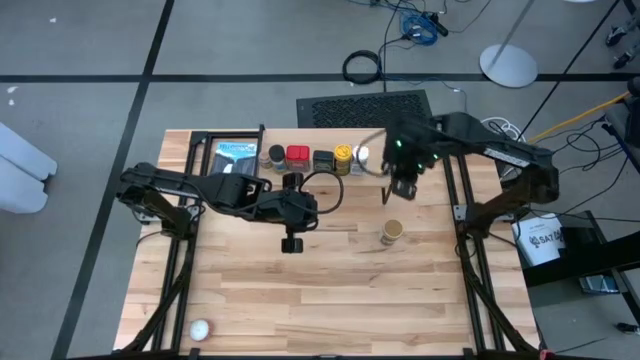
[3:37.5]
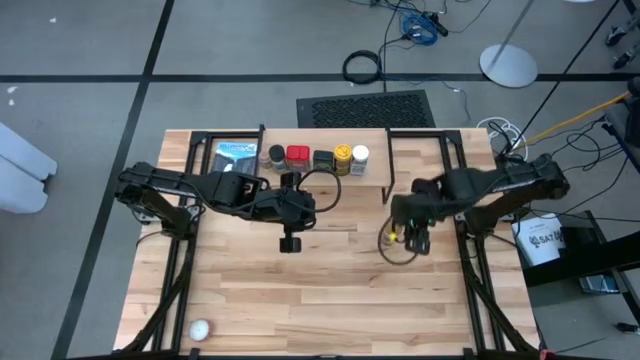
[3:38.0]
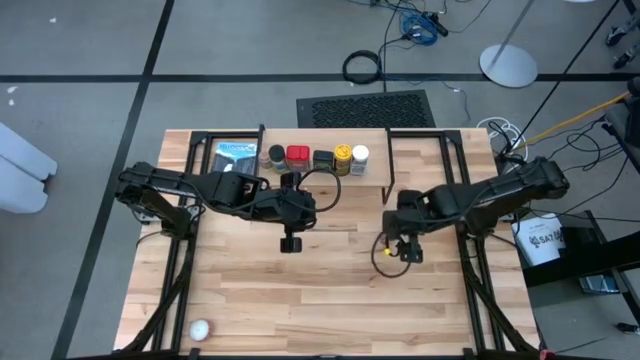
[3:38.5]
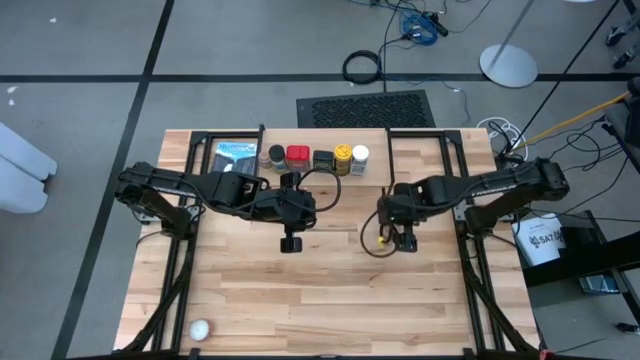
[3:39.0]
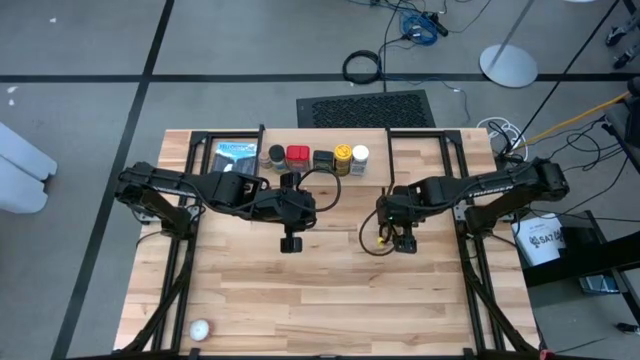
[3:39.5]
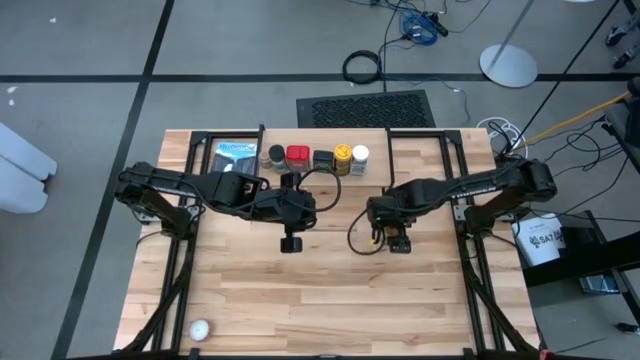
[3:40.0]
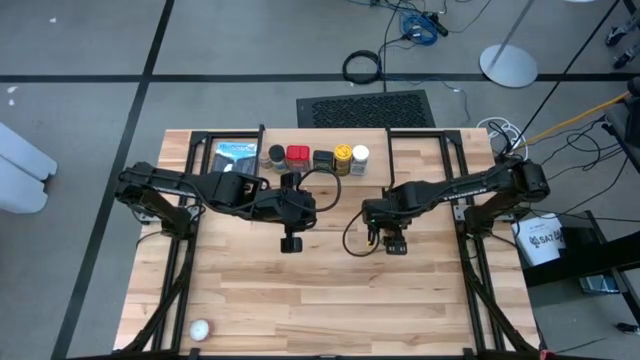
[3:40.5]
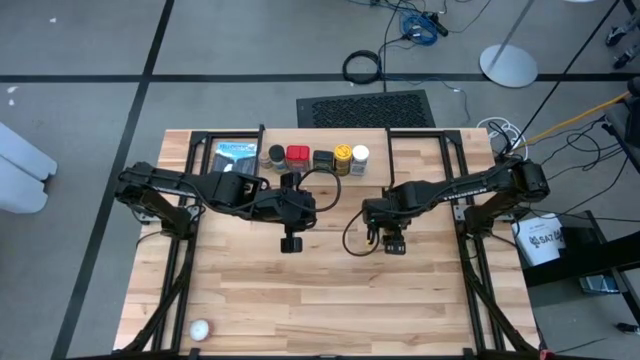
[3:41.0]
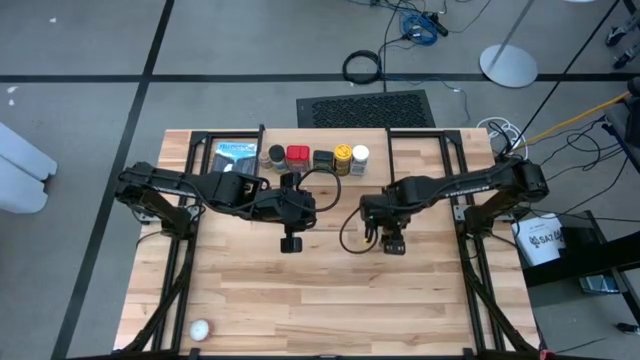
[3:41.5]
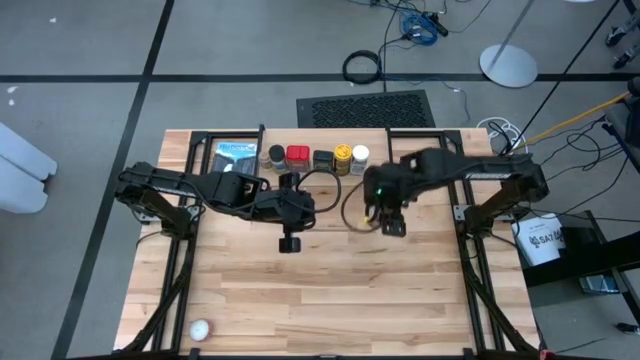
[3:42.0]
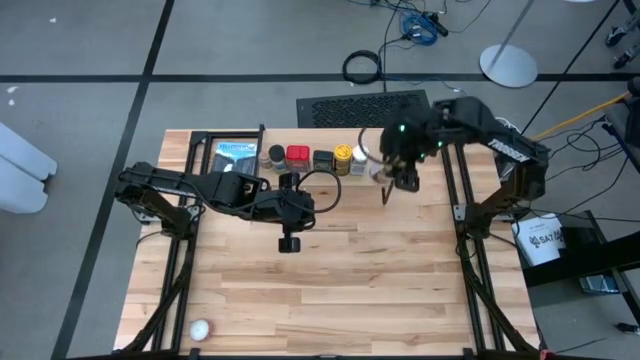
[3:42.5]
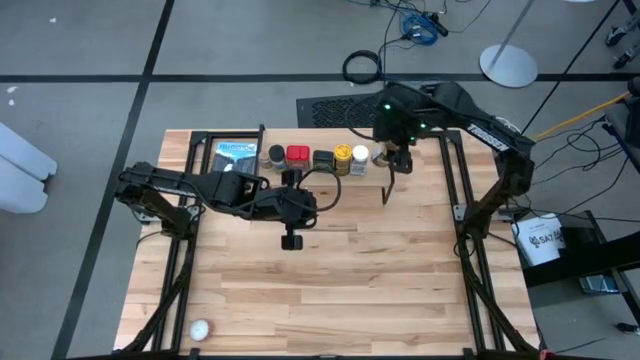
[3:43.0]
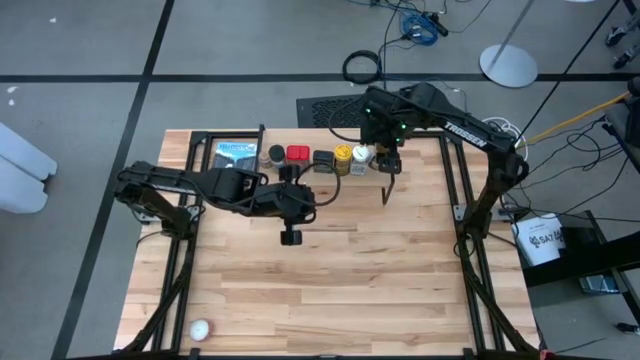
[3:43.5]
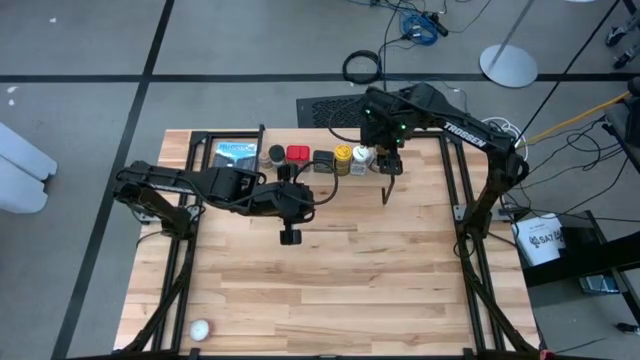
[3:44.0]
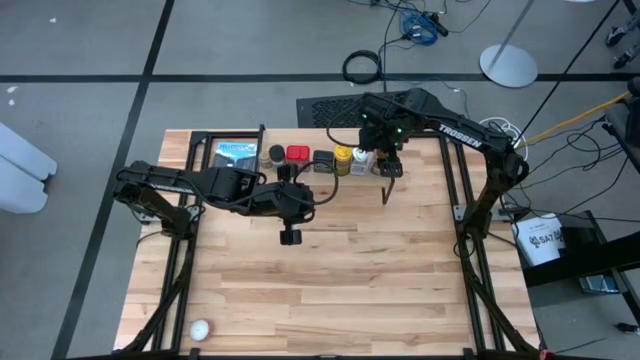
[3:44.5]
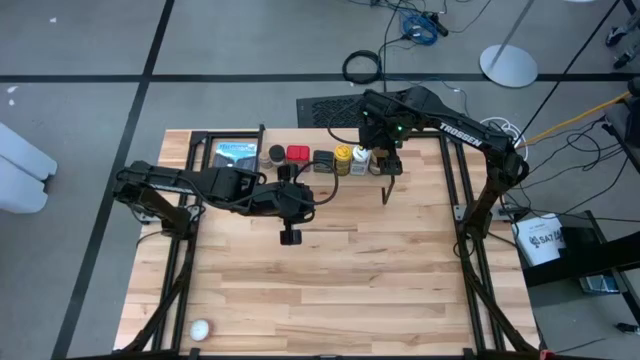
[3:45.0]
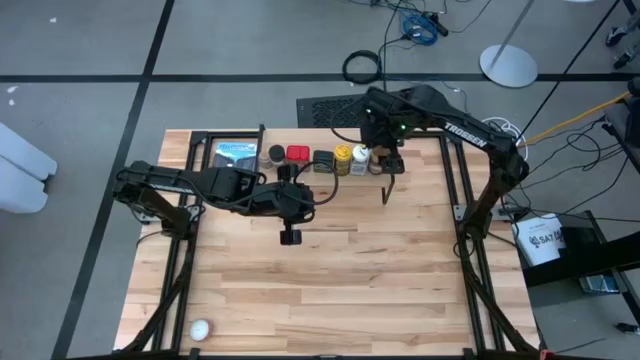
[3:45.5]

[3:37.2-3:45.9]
Task: Shelf spices
Put the gold seasoning bottle on the shelf

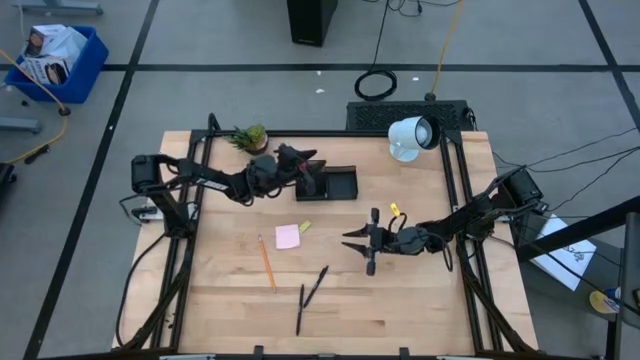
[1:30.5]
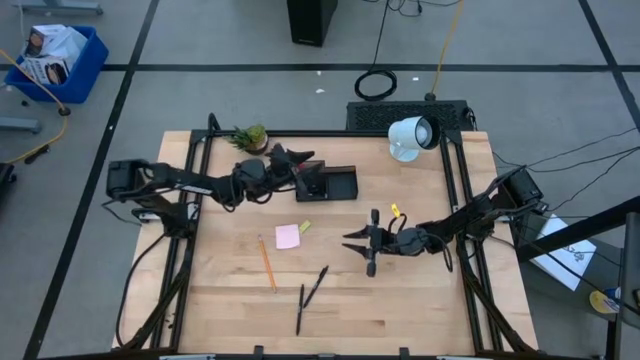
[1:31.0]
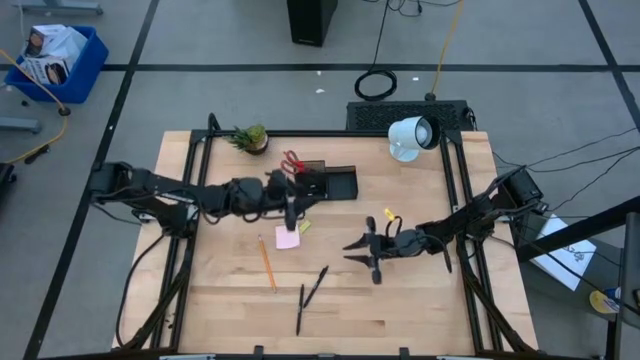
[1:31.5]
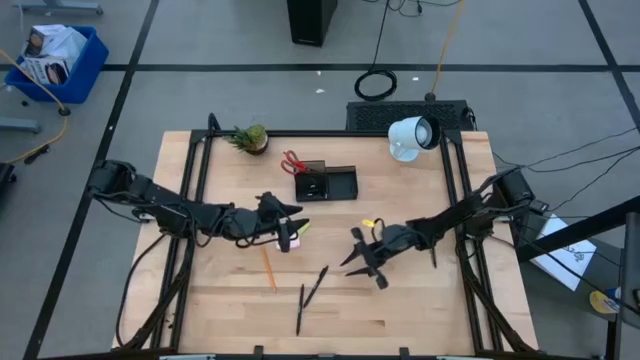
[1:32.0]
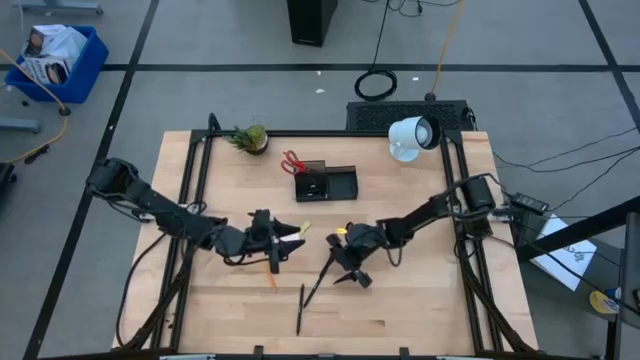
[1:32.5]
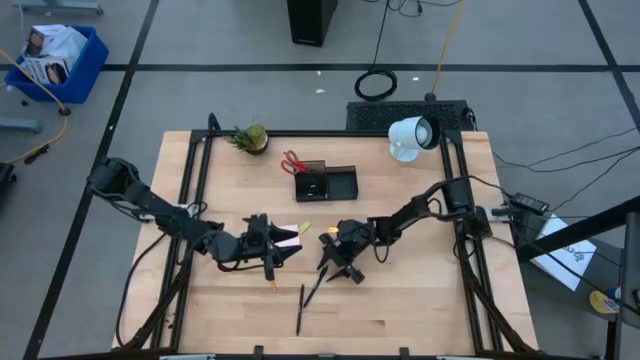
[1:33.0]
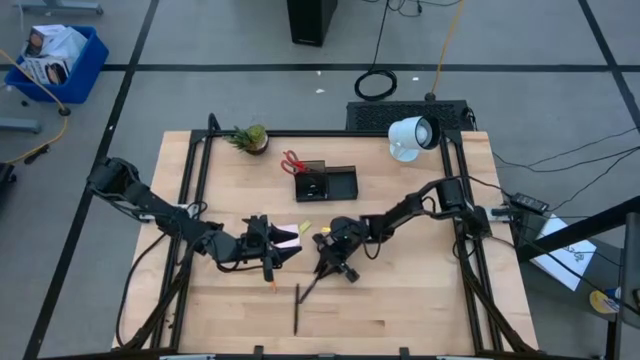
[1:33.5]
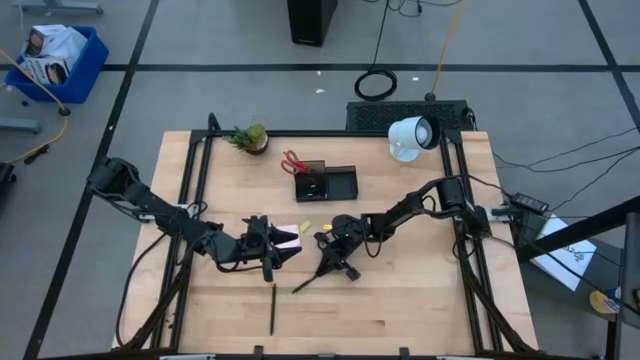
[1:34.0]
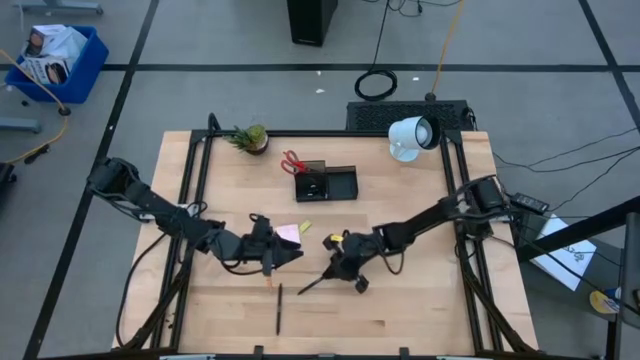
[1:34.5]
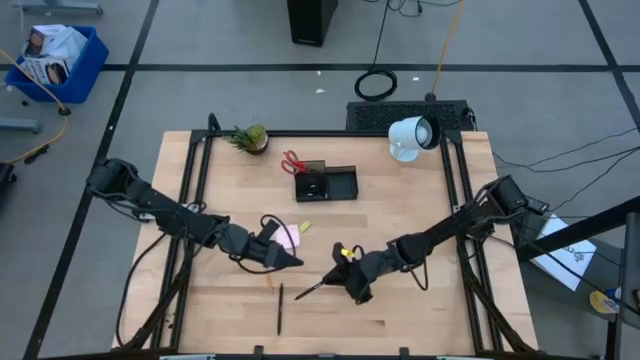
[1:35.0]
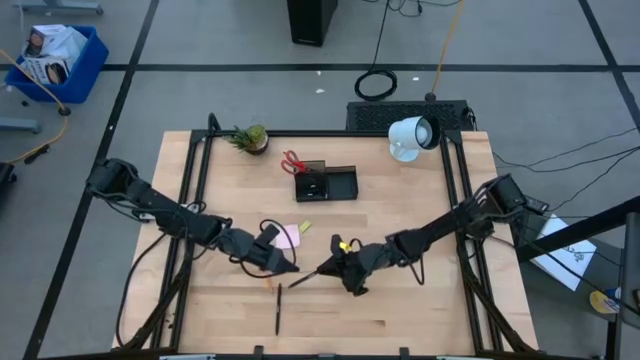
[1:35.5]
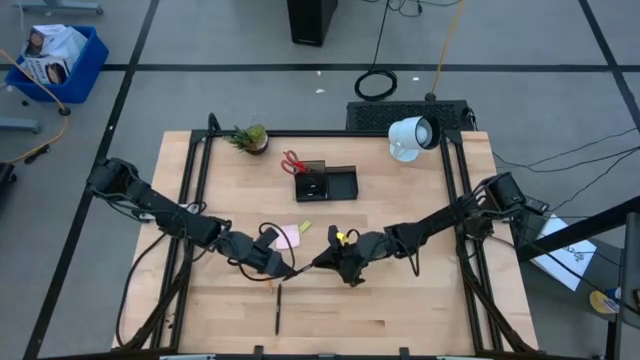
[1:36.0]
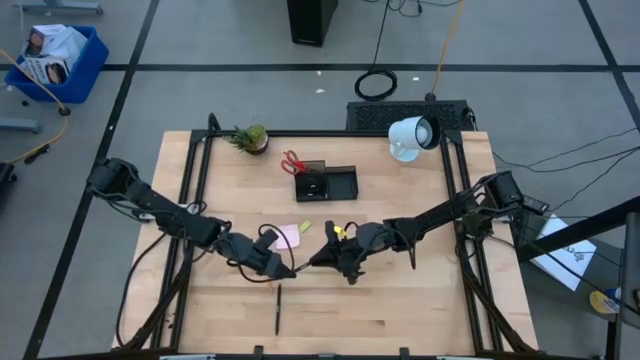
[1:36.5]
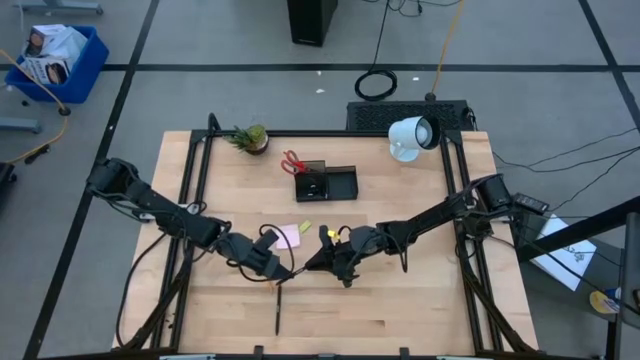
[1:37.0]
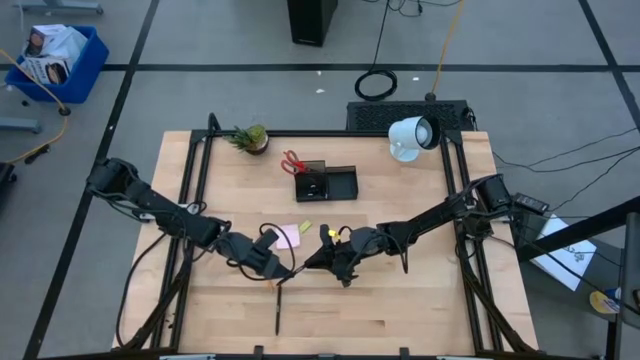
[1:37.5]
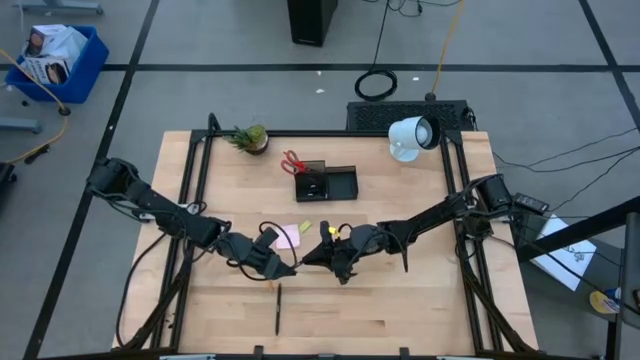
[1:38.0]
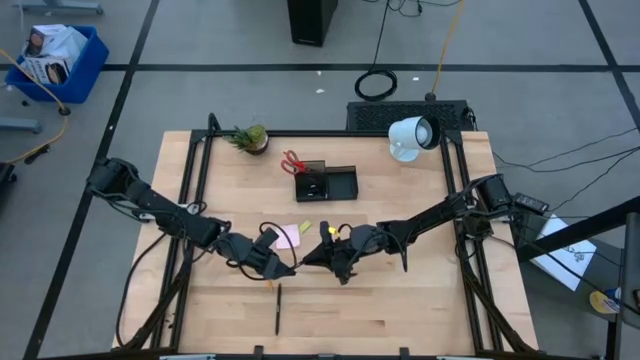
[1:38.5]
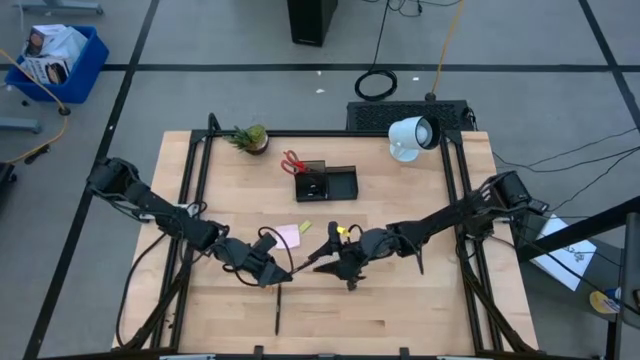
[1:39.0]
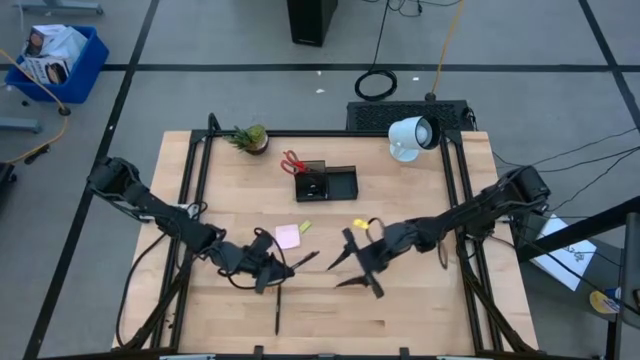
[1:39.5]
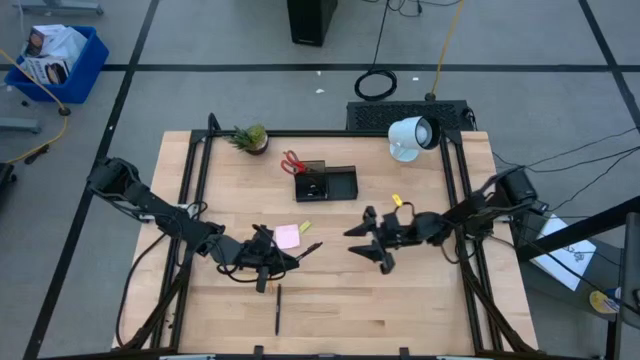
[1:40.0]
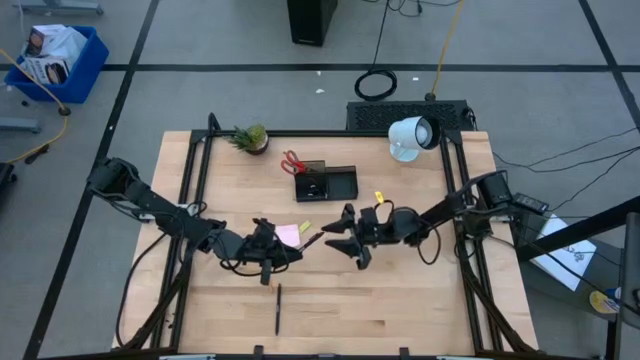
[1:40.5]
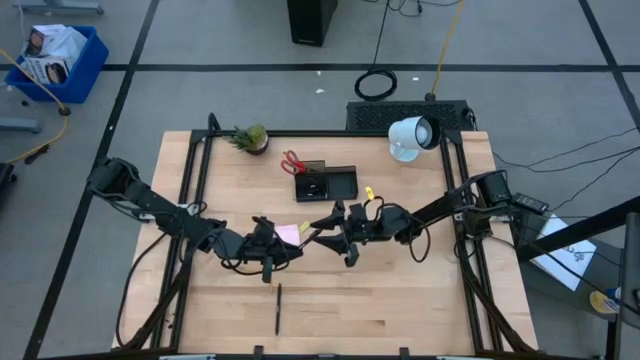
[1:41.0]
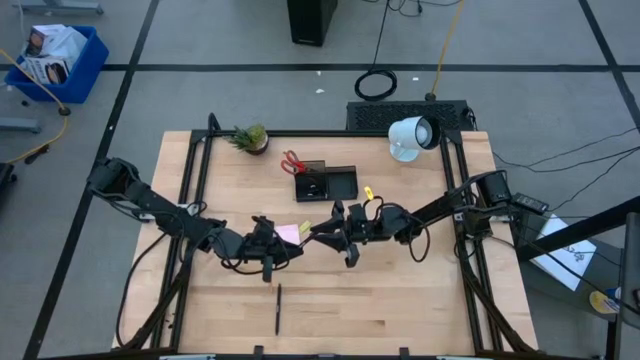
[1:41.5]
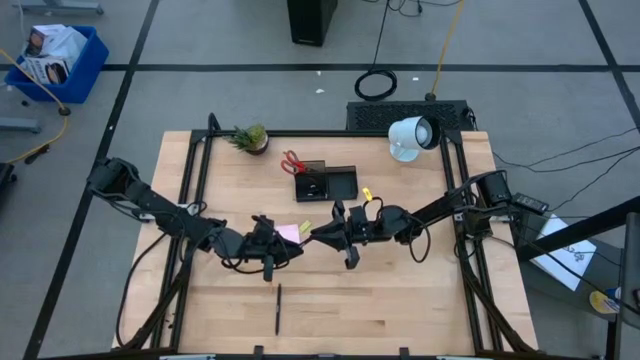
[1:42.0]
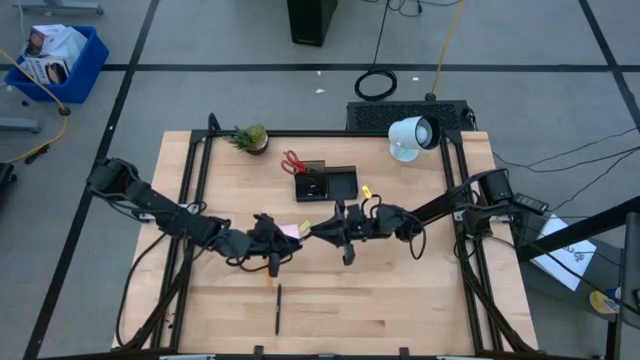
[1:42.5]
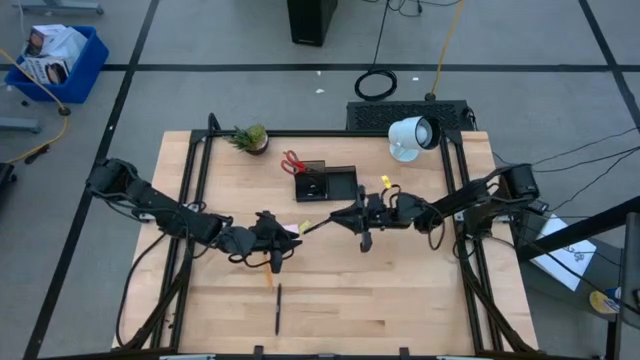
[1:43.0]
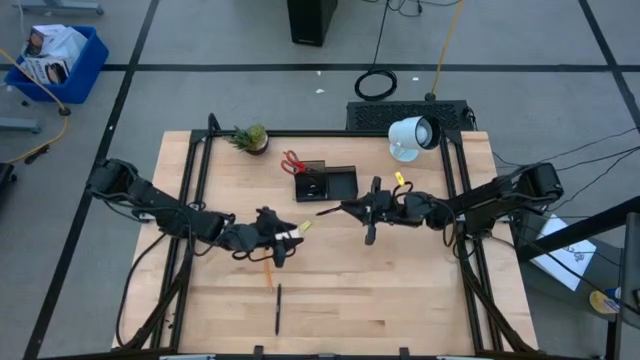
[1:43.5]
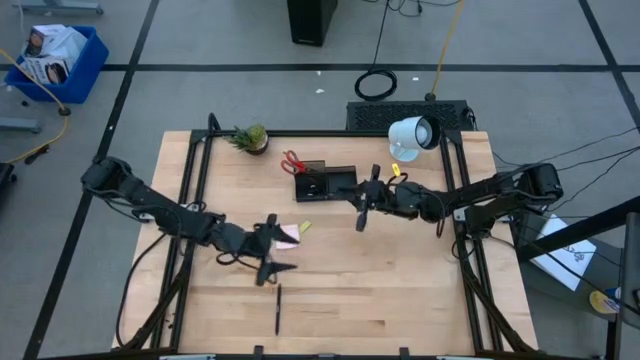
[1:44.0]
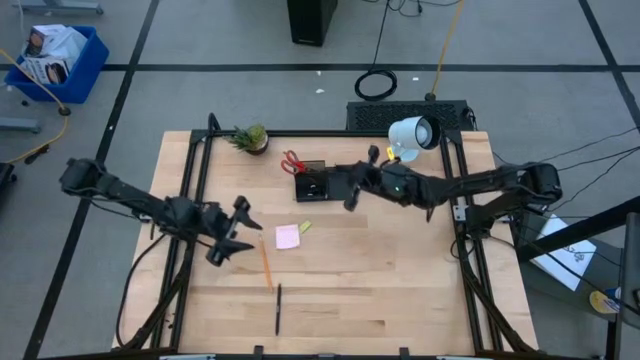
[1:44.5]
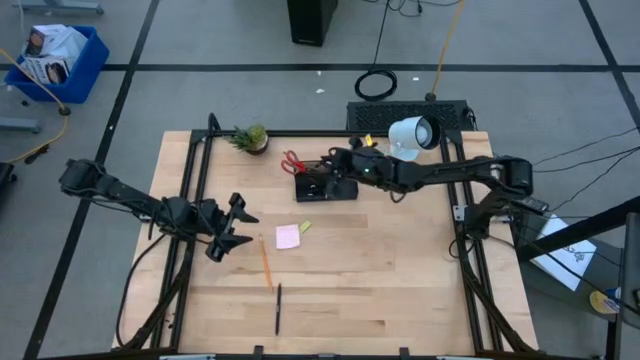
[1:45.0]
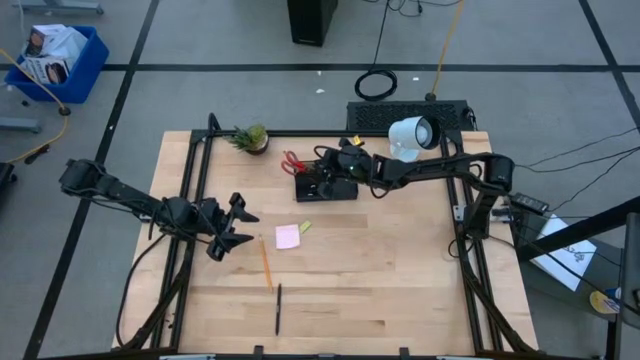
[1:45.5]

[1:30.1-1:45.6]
Task: Pick and place office supplies into organizer
Put the right pen into the mesh organizer
